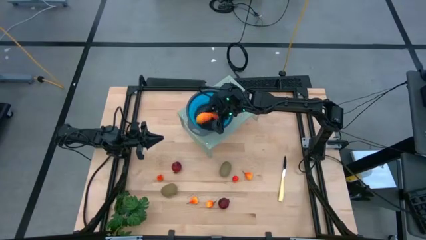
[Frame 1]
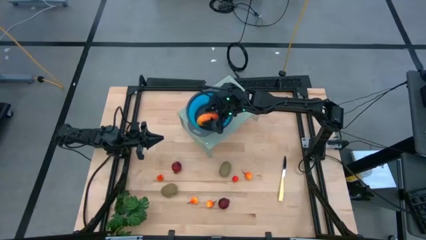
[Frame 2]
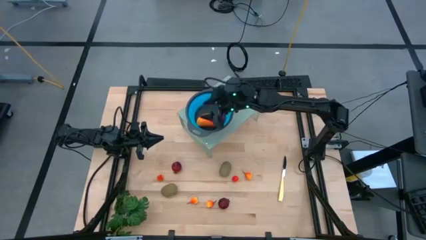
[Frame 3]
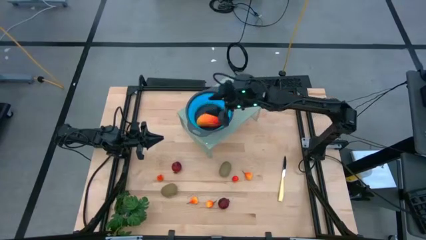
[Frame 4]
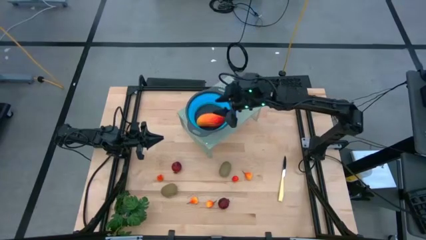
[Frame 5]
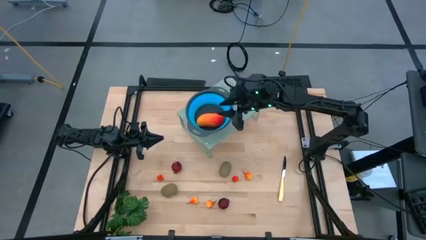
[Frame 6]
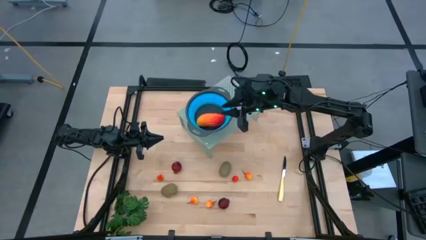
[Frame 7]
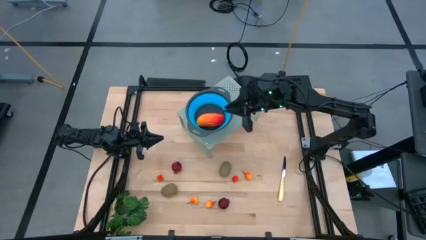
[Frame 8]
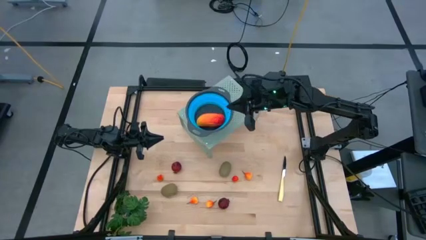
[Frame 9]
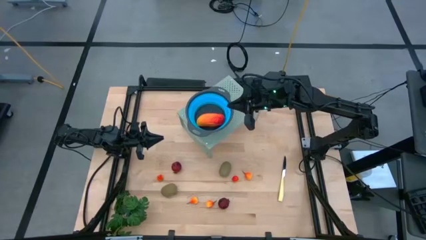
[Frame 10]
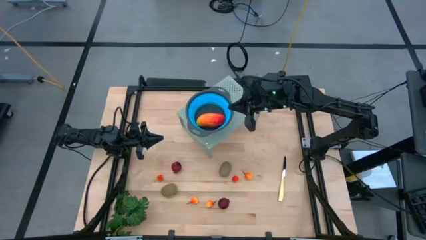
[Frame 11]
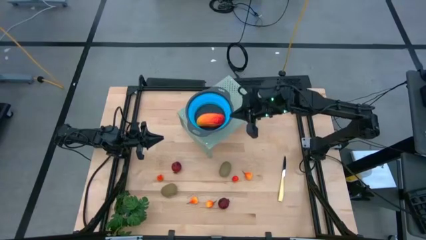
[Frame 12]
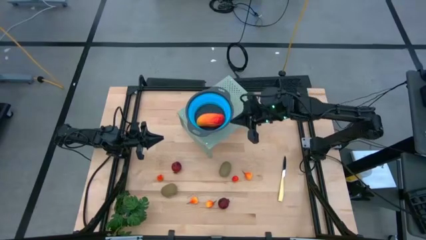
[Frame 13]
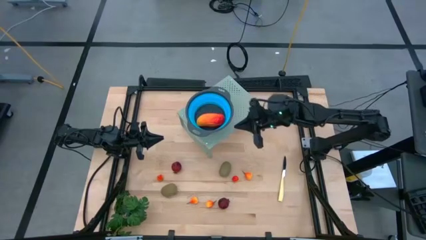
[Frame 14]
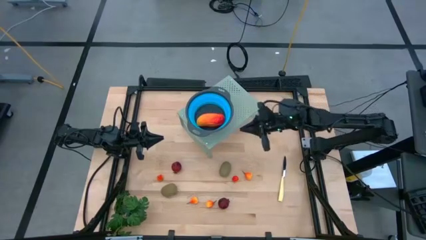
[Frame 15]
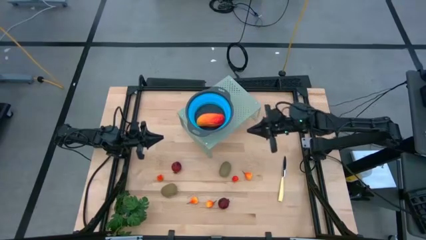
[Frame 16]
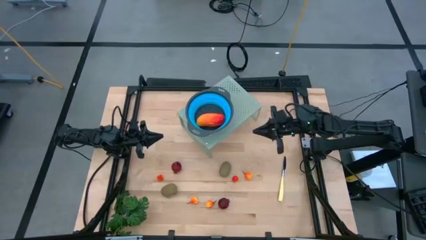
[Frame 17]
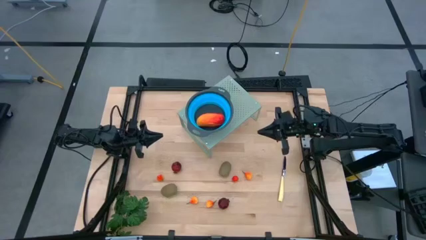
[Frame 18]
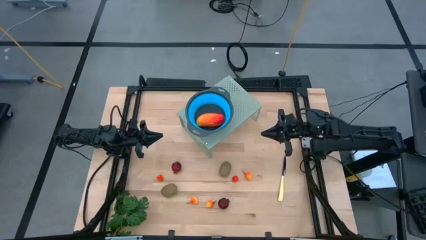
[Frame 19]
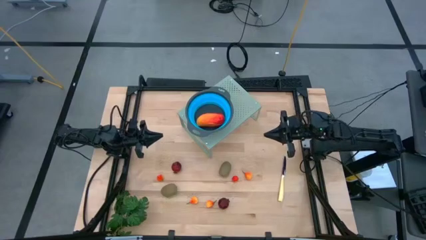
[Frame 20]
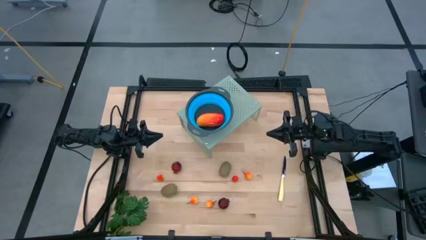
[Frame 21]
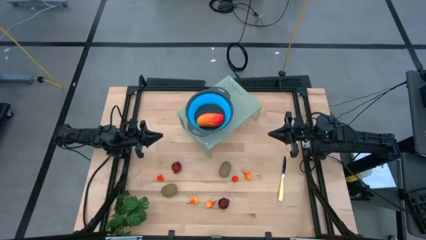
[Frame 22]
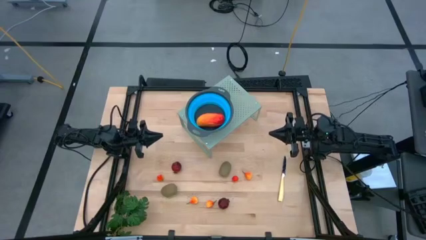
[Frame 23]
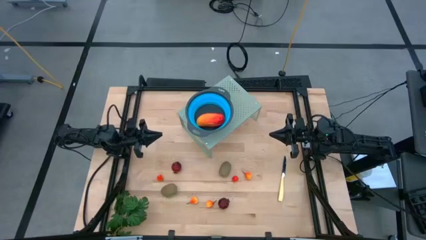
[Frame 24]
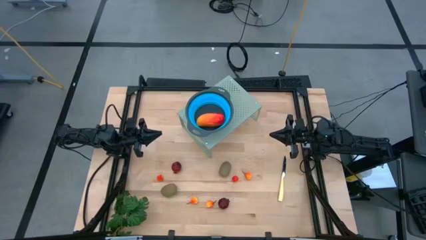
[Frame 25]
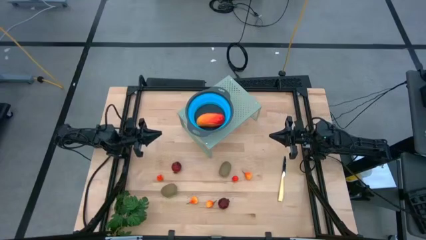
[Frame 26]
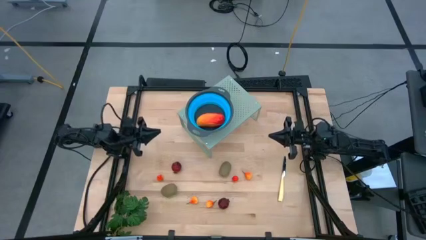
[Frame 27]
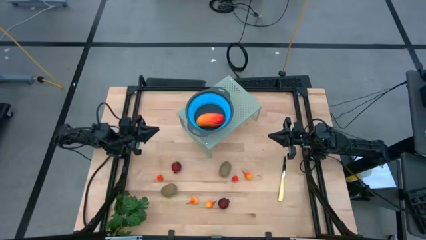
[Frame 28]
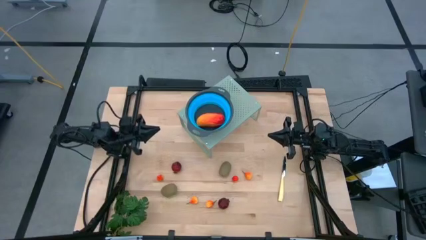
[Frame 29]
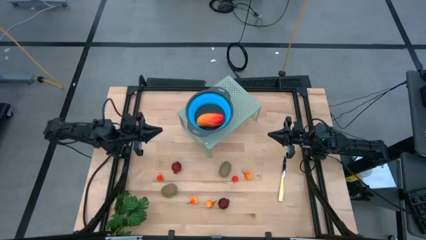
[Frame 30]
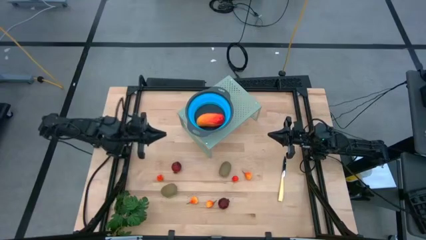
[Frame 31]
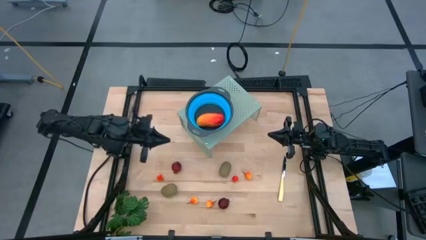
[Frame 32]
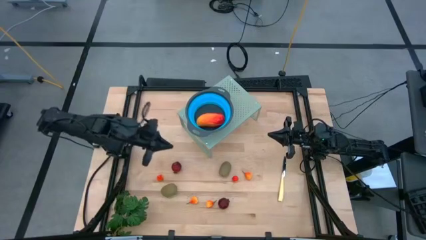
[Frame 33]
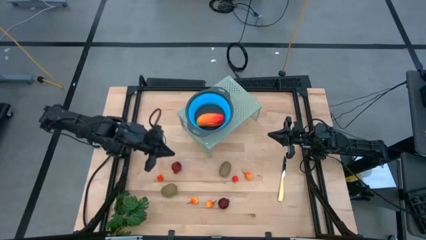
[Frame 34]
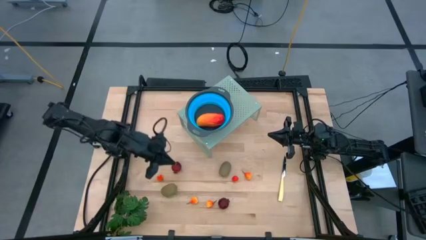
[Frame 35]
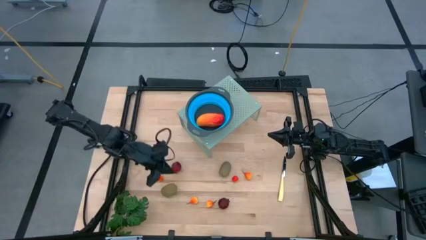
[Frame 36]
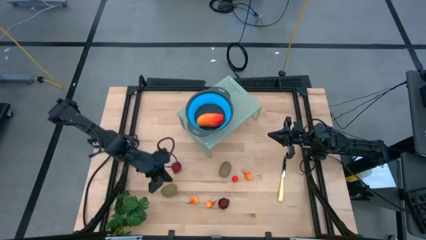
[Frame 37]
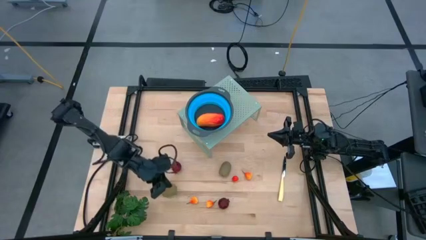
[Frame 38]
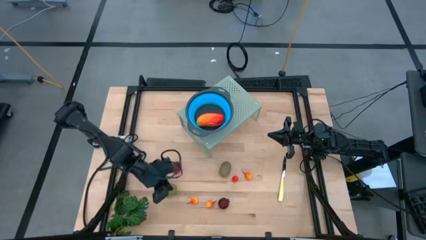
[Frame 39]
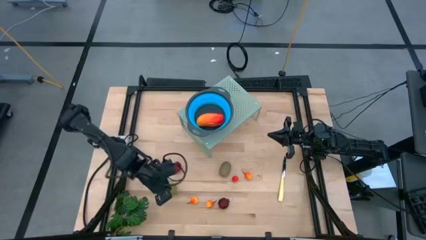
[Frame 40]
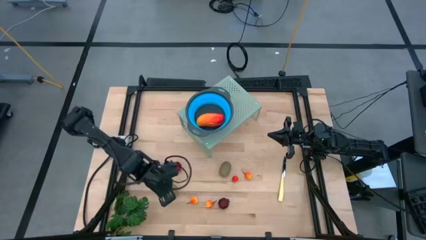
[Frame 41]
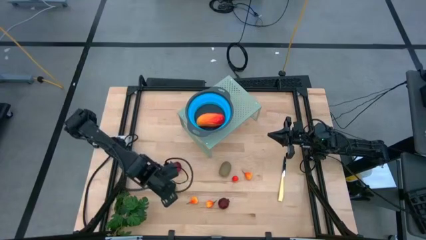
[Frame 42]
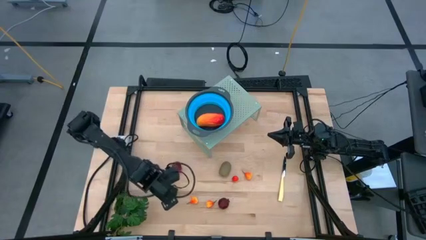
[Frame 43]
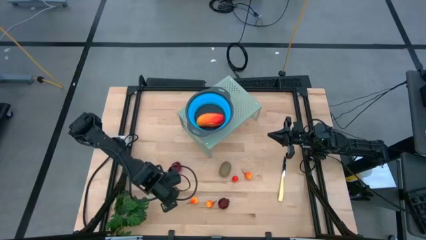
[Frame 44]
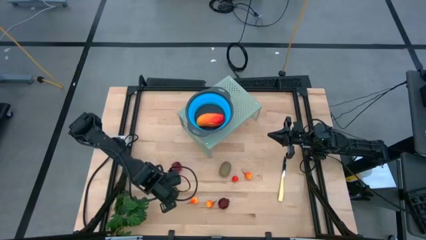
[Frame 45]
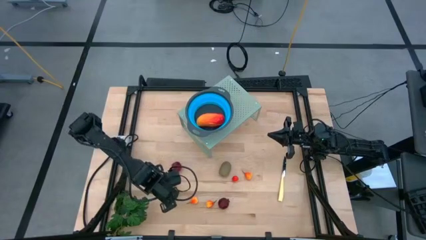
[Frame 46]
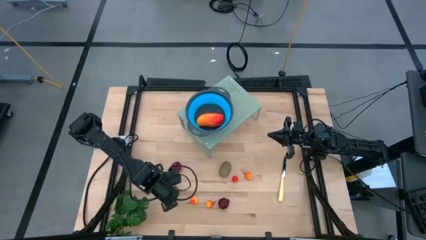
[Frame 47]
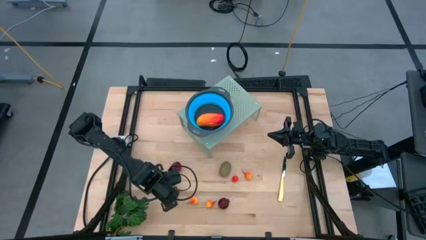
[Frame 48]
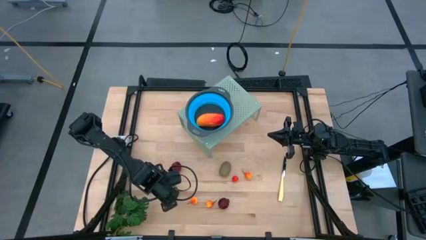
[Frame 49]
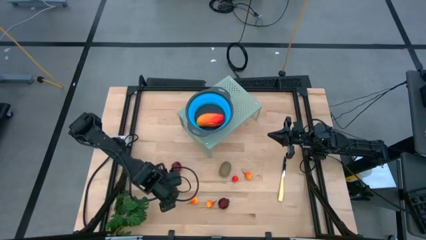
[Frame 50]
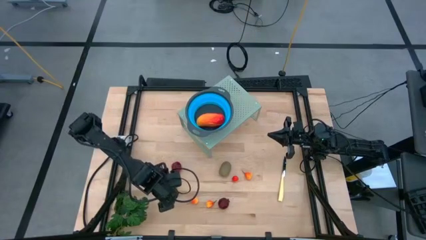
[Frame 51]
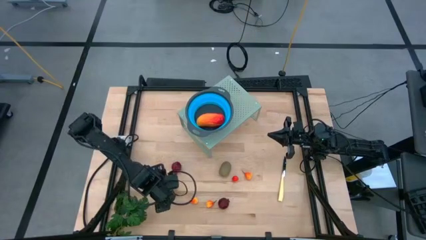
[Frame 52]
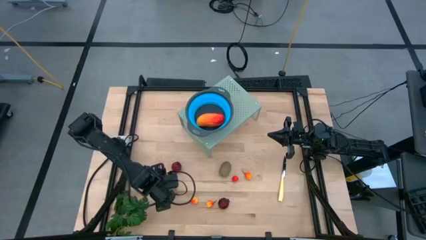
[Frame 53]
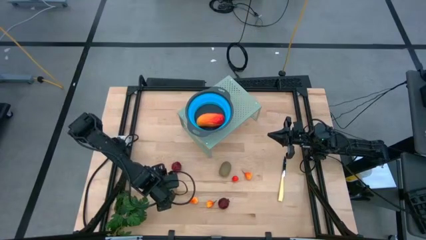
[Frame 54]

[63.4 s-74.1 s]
Task: Pick & Place Fruit
Put the kiwi into the blue strainer bowl on the shelf
